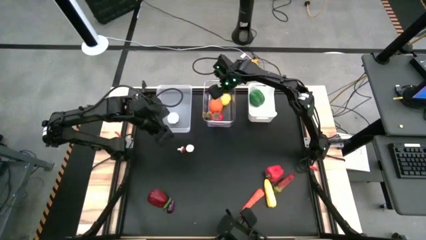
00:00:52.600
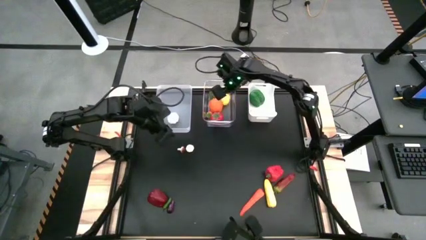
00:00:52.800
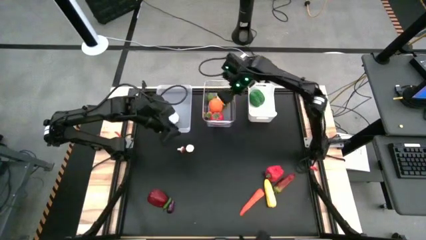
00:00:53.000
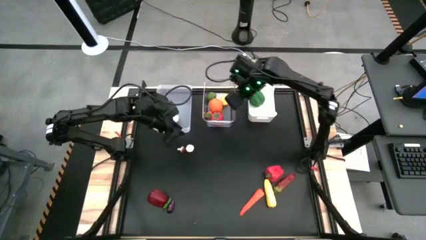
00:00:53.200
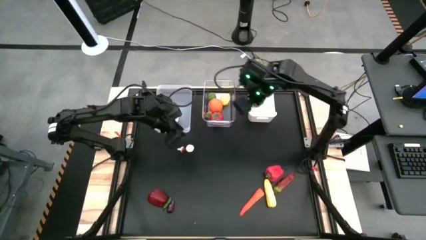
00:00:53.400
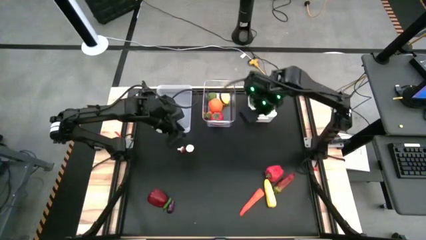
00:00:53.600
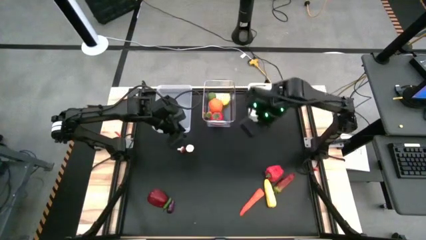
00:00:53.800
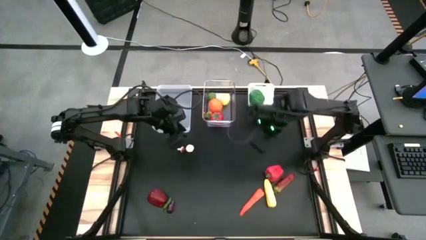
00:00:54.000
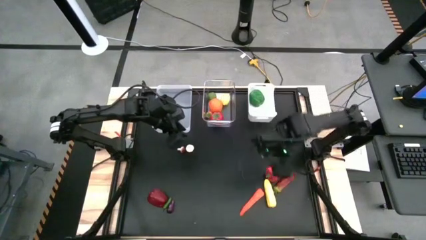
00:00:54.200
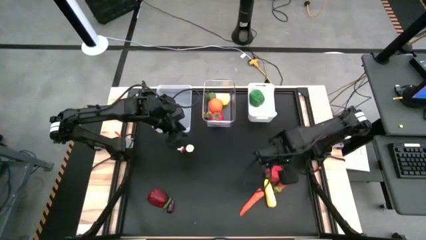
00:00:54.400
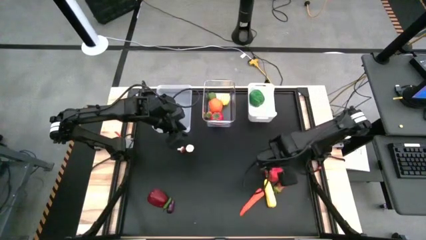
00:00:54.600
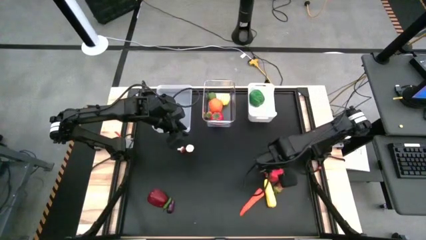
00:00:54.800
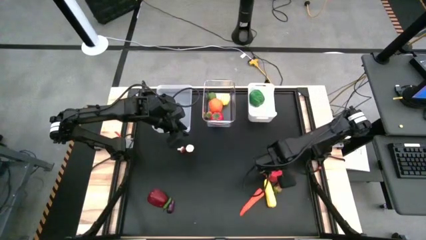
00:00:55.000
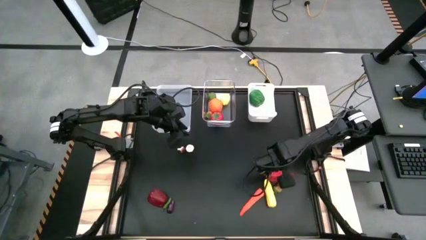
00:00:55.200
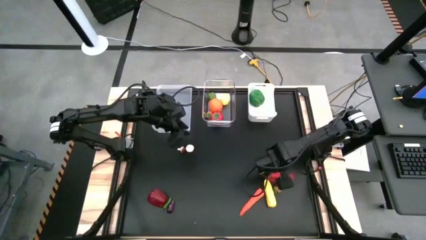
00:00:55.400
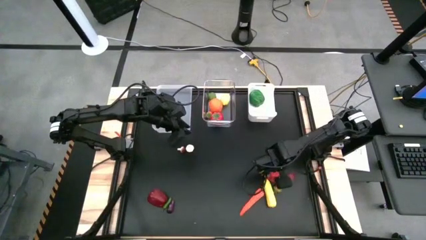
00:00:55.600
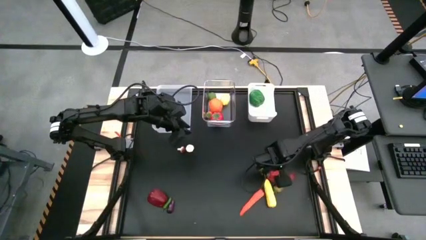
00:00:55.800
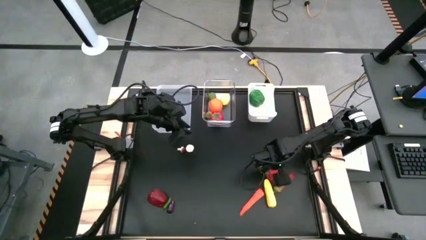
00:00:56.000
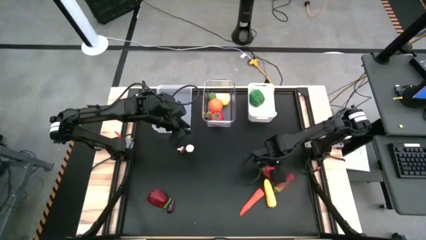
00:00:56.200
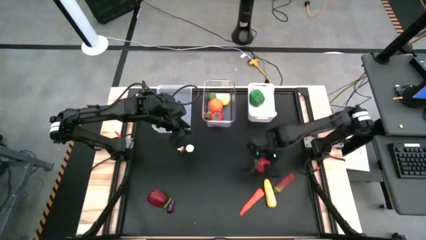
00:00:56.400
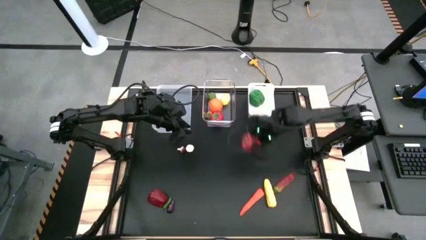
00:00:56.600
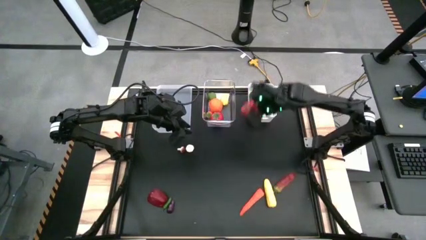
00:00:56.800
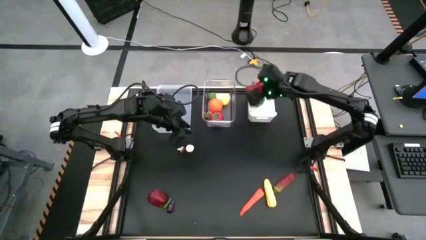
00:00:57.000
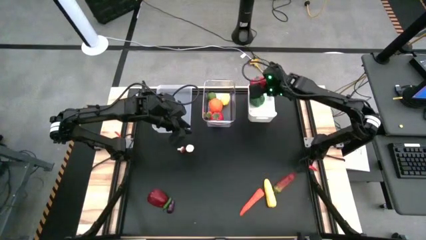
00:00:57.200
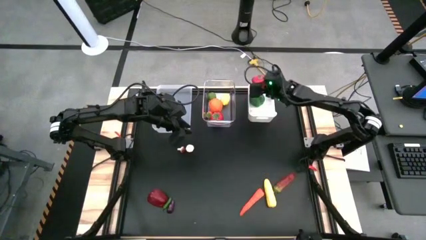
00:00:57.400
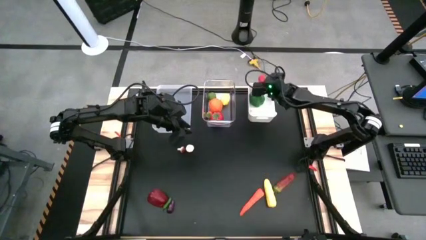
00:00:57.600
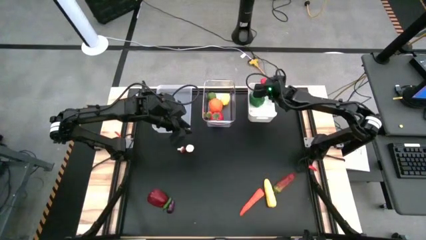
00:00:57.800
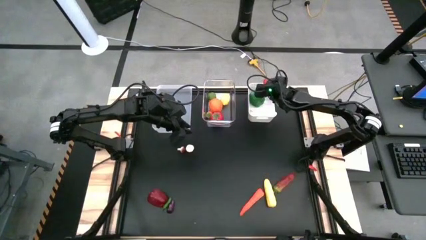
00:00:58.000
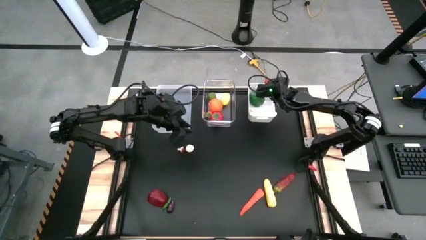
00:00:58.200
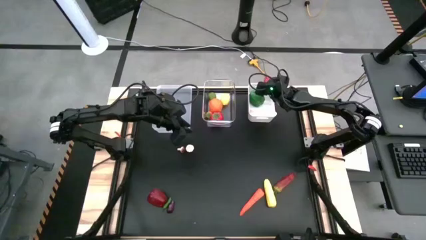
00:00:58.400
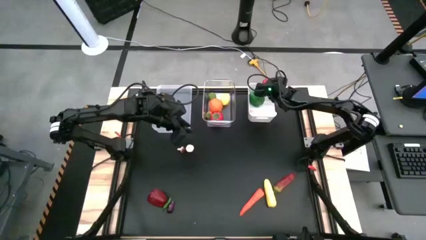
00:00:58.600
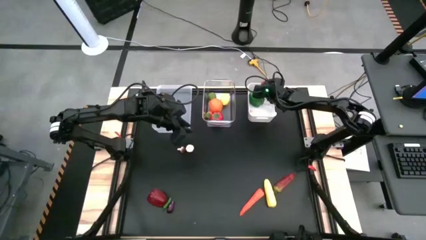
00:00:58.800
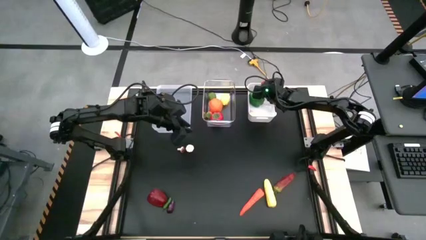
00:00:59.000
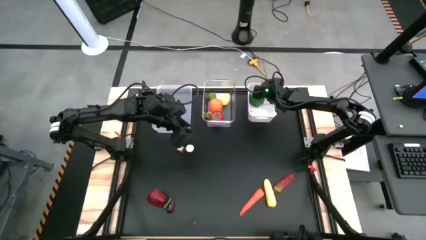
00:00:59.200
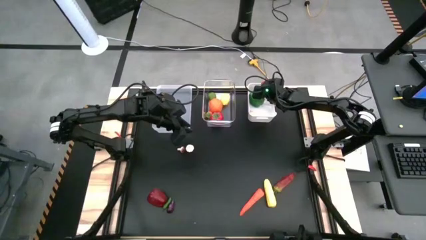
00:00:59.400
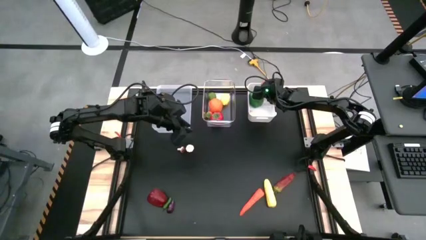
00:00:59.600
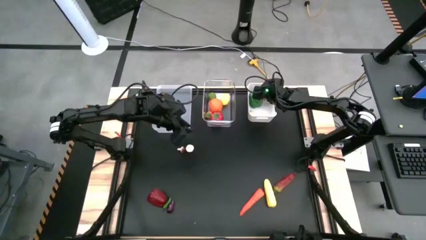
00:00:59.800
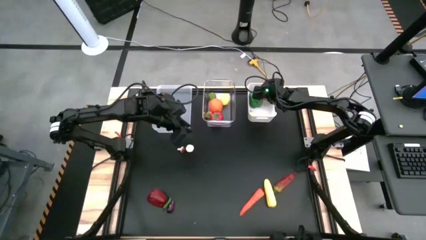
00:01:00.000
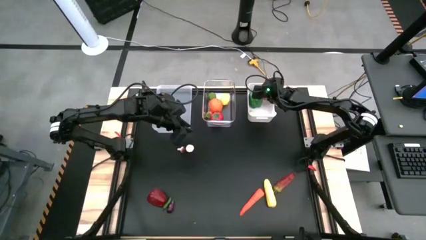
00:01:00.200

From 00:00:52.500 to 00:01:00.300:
Task: Sort produce into baskets
Put the red right bell pepper into the white bin

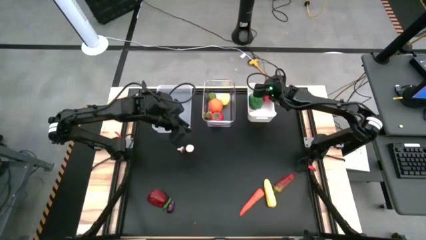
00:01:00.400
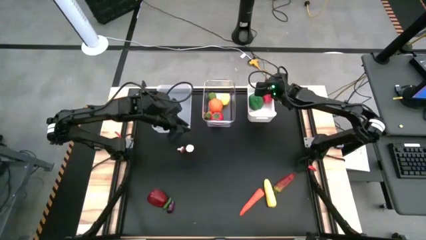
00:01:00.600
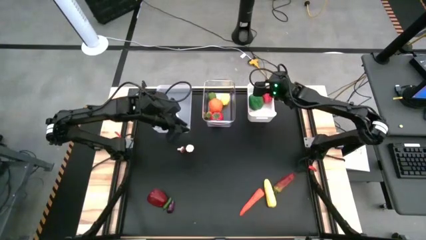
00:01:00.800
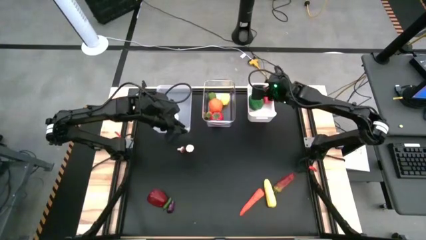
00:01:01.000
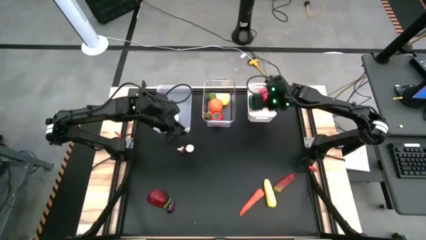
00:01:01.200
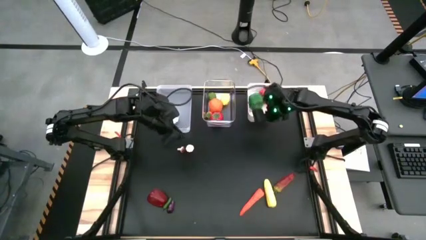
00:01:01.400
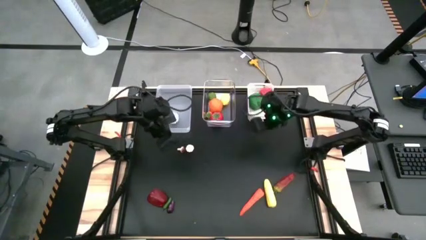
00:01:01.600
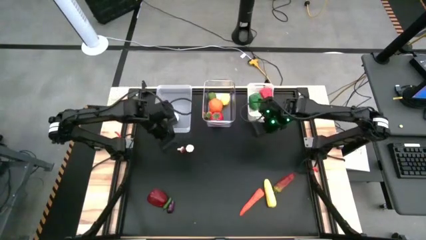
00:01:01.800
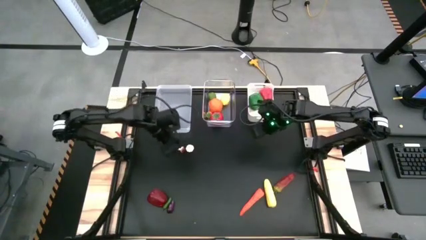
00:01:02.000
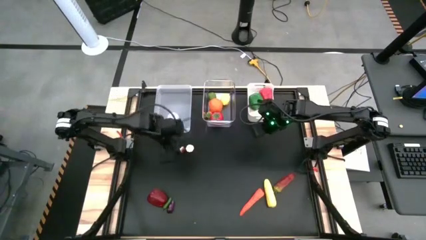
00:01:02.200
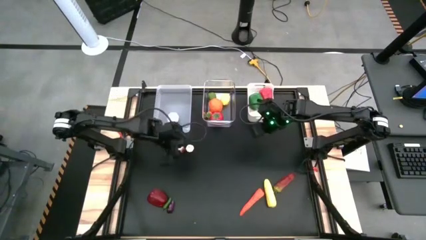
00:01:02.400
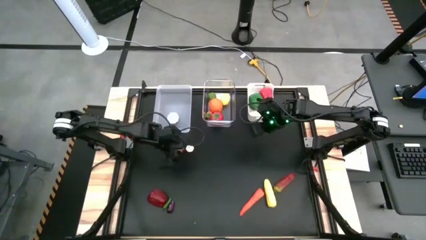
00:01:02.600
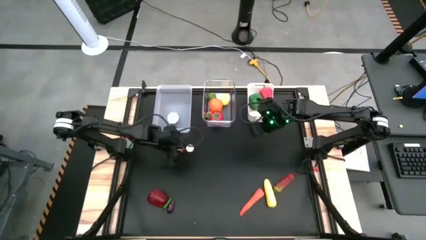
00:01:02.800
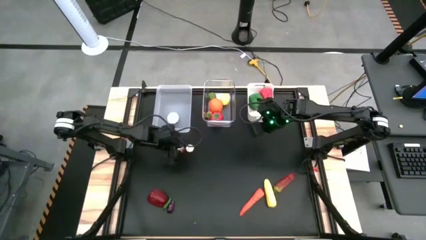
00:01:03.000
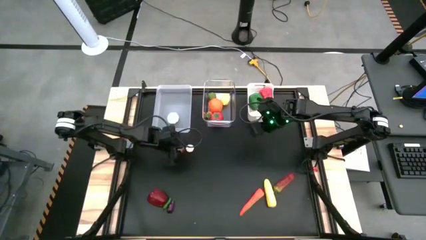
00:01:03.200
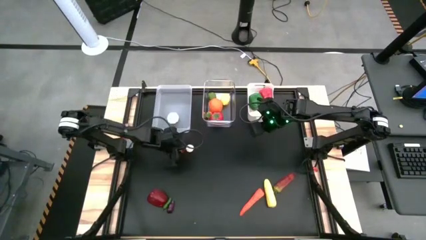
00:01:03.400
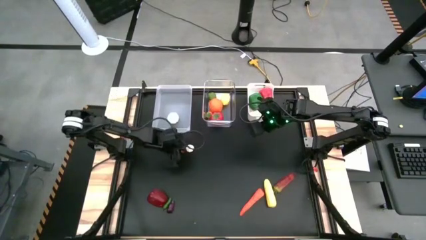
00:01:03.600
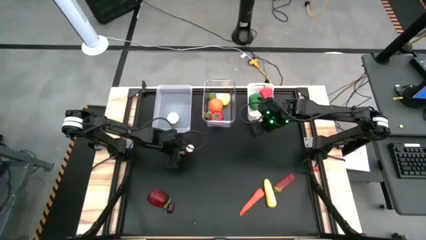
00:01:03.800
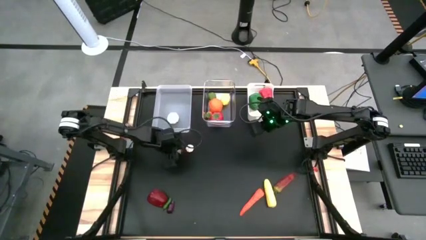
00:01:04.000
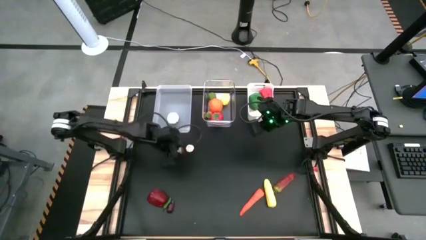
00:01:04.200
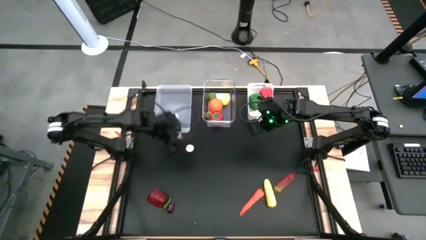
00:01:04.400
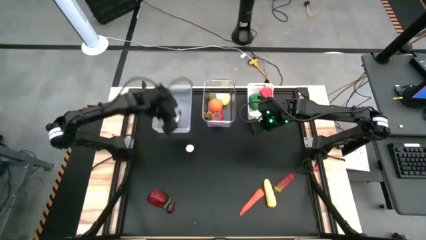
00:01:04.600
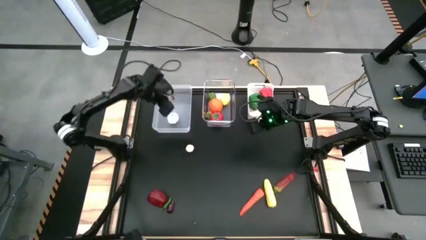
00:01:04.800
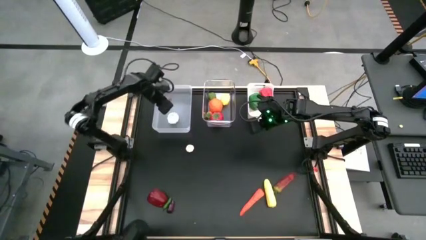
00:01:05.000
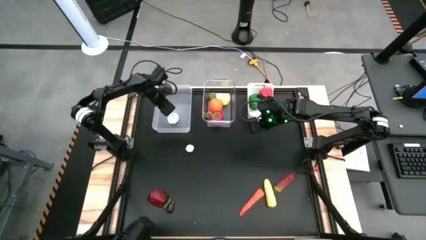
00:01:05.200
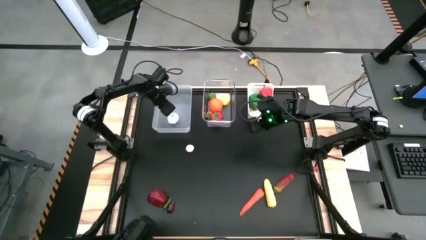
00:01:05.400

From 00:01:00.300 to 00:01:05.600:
Put the brown mushroom into the left transparent bin

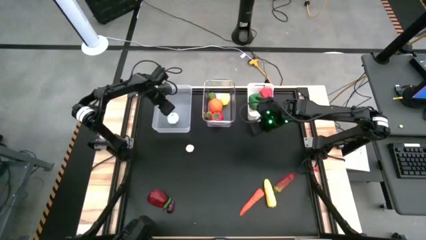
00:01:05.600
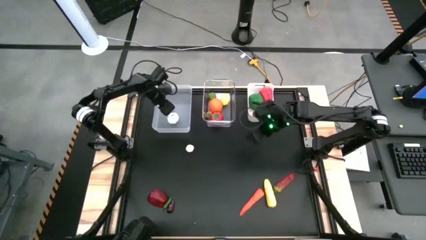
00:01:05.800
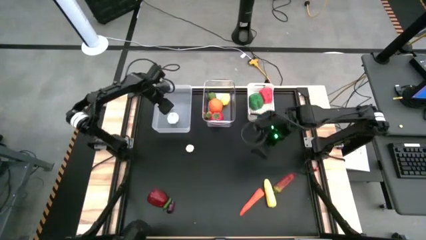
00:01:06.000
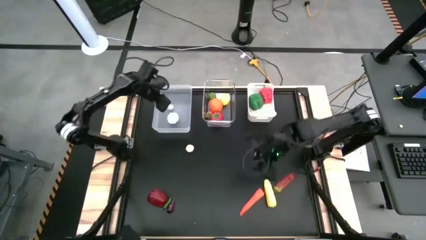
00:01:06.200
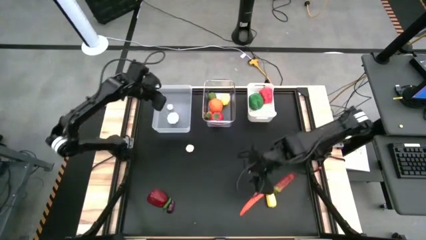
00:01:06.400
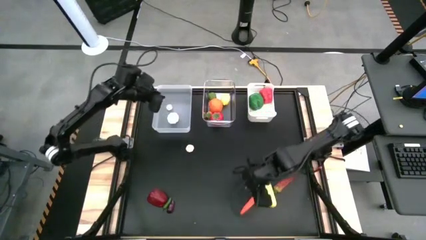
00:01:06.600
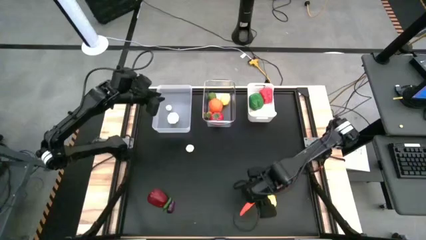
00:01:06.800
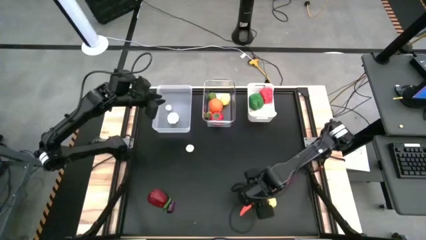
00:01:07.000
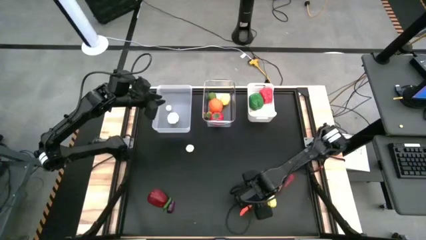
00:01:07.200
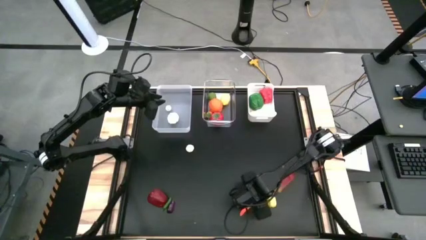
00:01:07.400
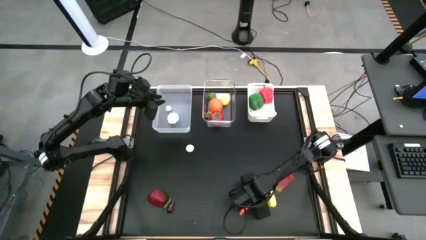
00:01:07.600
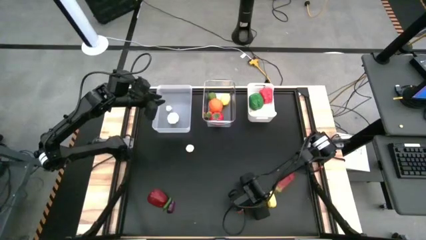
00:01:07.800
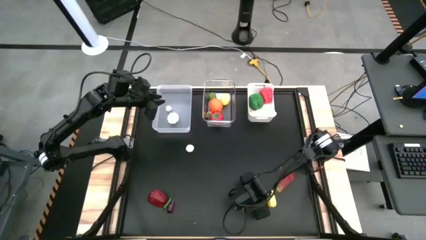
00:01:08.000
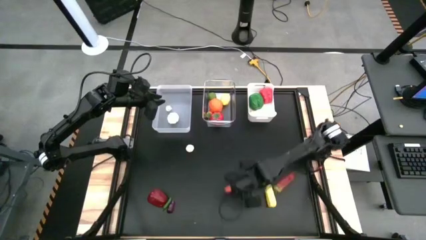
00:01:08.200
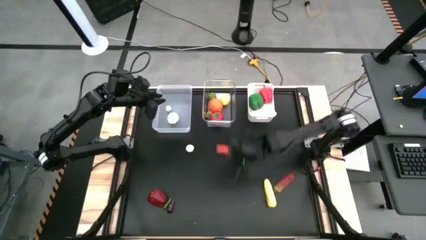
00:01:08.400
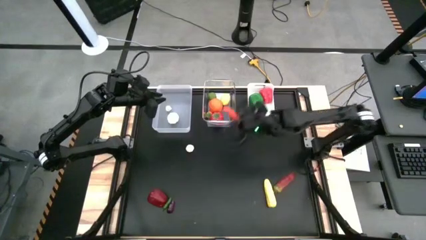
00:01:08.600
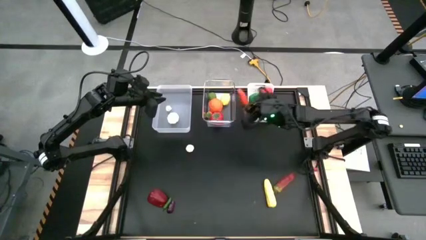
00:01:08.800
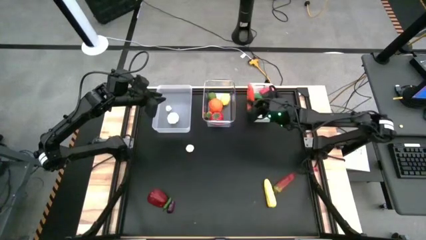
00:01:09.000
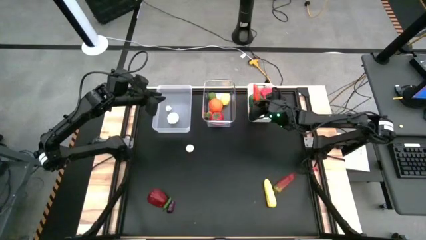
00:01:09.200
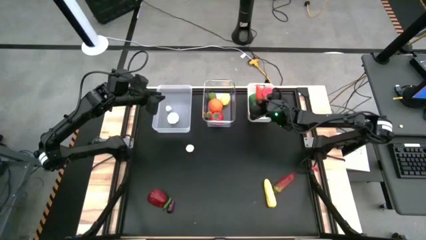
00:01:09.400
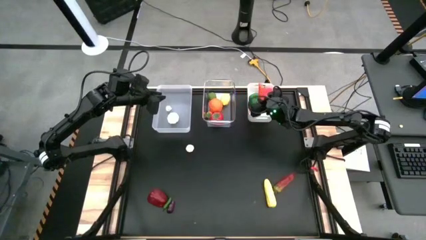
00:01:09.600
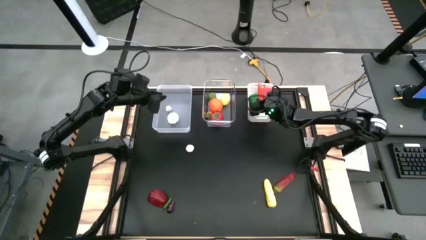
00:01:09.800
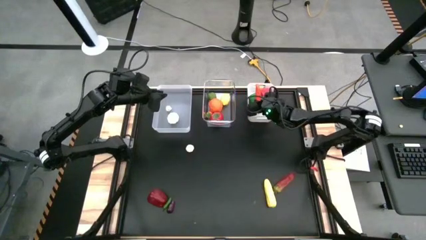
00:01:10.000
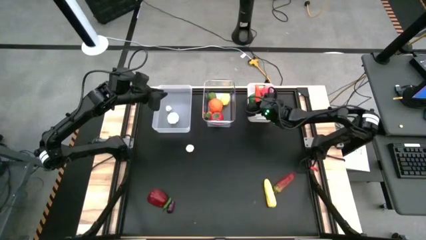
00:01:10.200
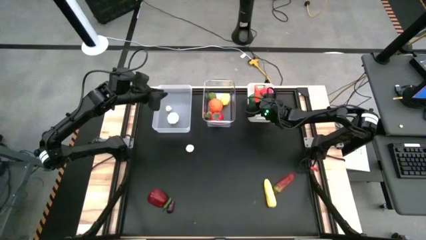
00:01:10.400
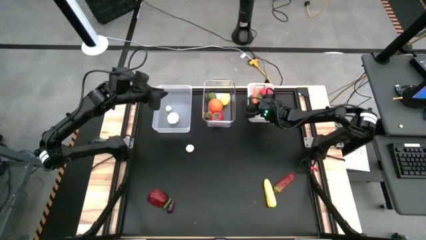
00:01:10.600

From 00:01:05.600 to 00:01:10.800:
Put the orange carrot into the white bin
